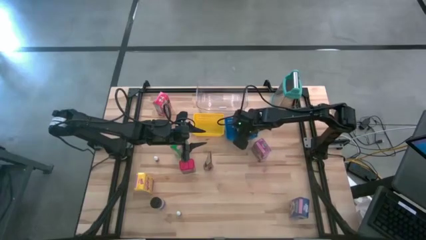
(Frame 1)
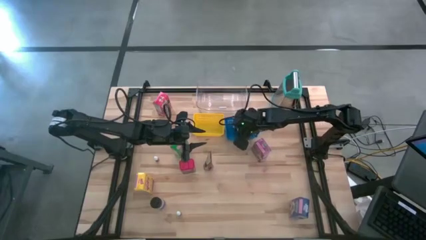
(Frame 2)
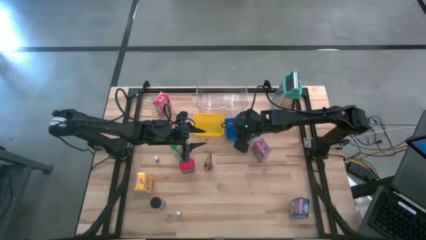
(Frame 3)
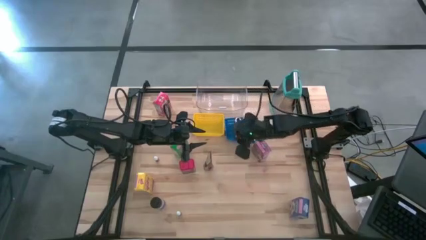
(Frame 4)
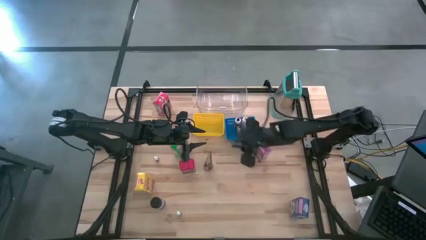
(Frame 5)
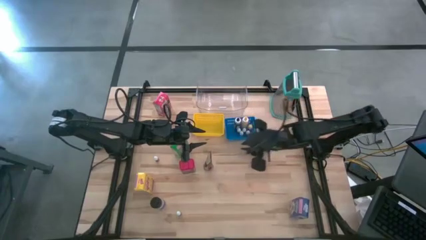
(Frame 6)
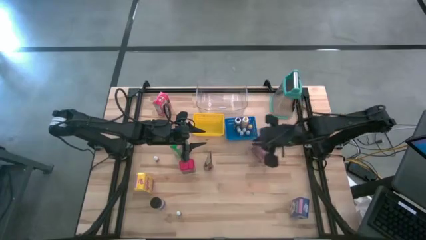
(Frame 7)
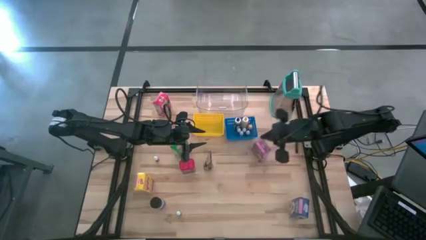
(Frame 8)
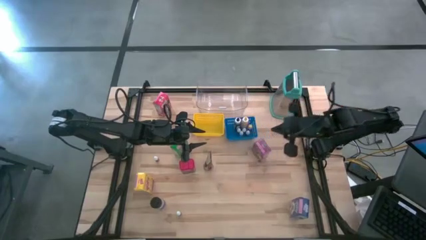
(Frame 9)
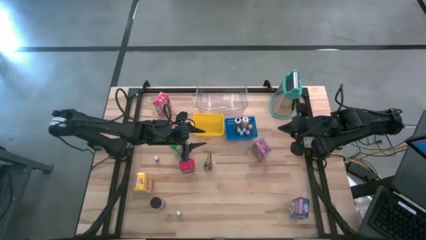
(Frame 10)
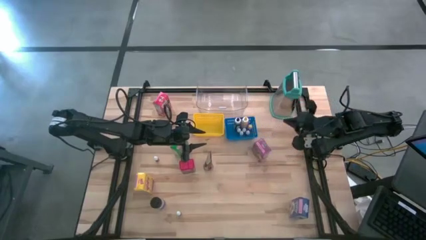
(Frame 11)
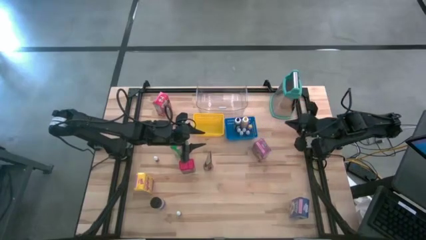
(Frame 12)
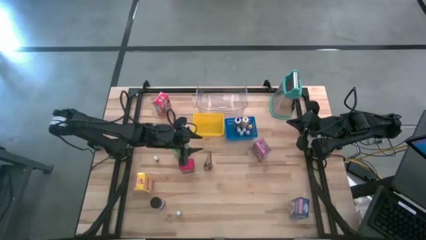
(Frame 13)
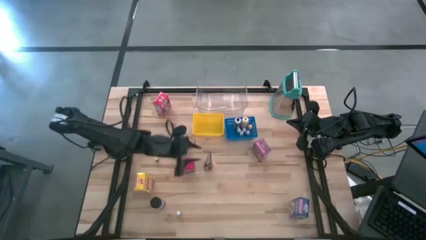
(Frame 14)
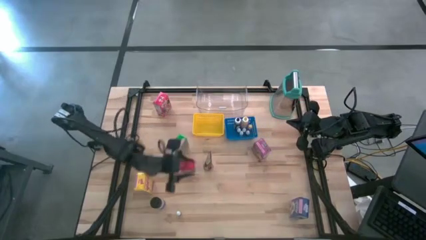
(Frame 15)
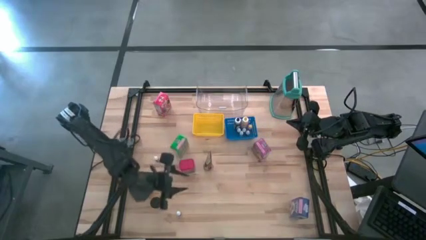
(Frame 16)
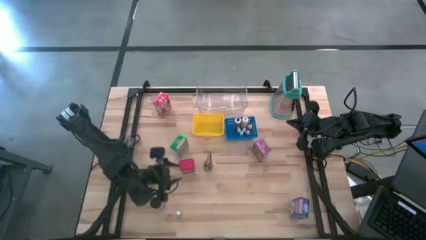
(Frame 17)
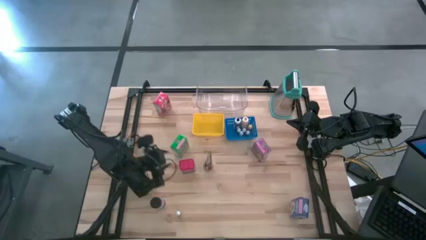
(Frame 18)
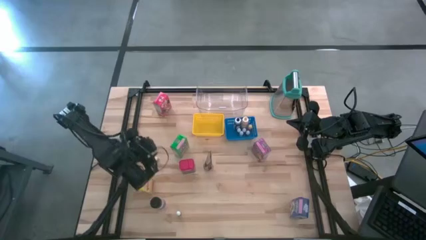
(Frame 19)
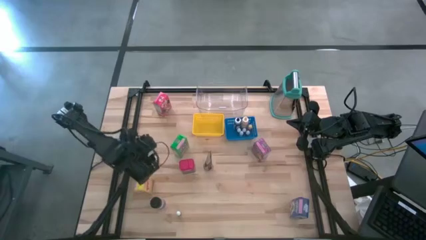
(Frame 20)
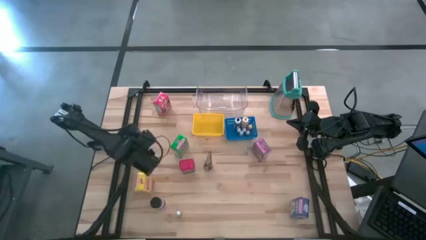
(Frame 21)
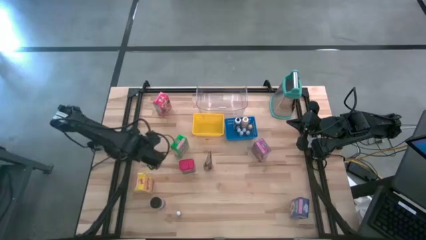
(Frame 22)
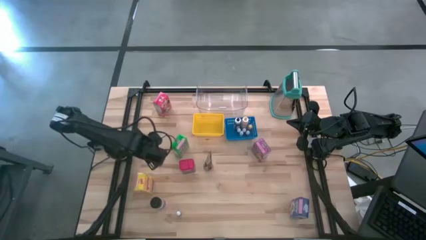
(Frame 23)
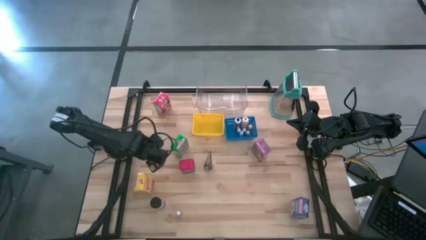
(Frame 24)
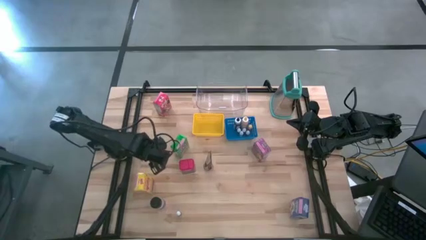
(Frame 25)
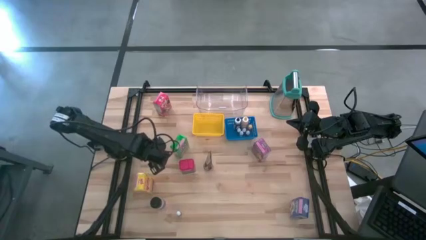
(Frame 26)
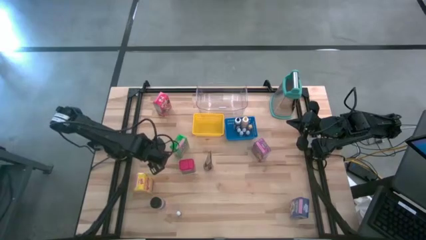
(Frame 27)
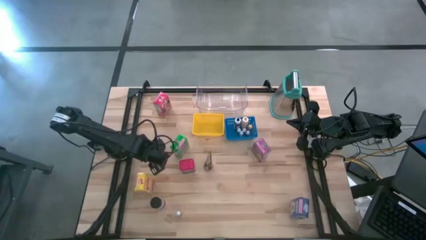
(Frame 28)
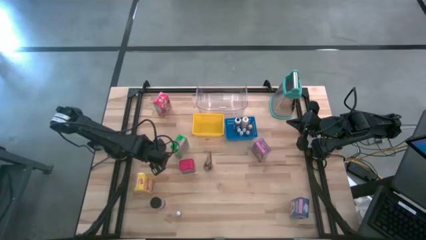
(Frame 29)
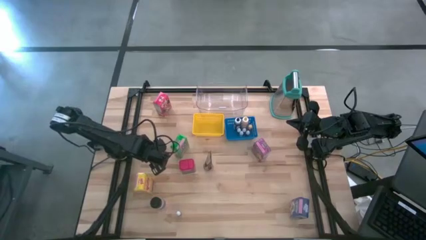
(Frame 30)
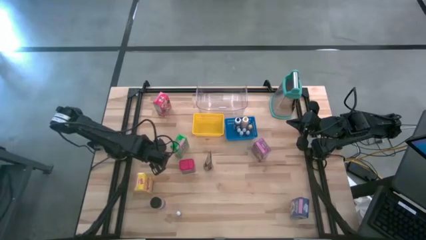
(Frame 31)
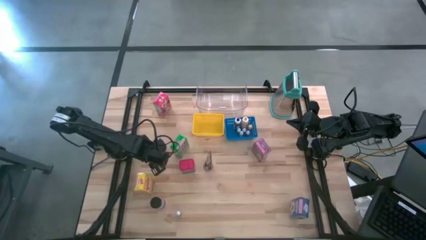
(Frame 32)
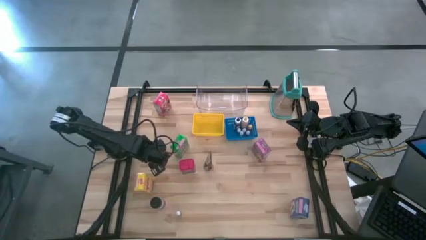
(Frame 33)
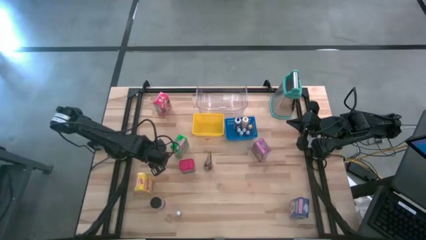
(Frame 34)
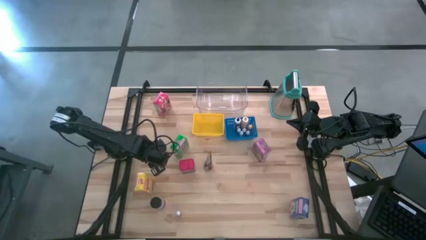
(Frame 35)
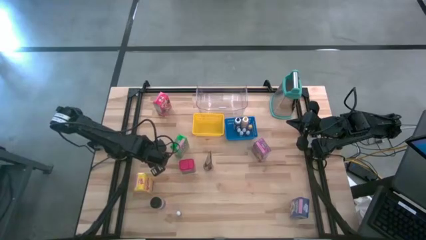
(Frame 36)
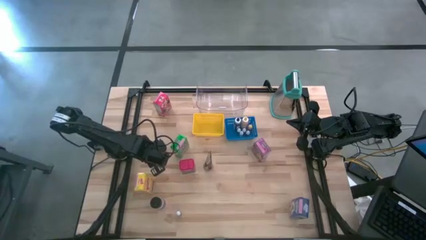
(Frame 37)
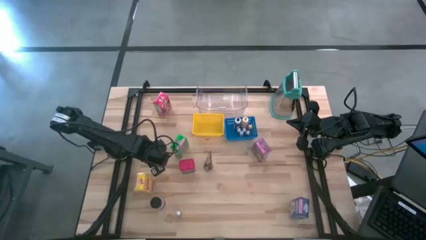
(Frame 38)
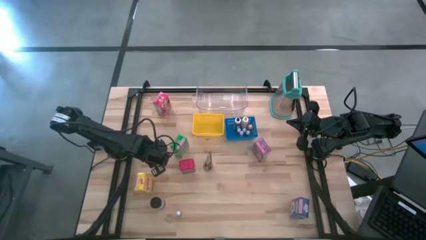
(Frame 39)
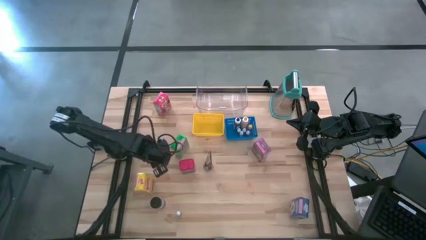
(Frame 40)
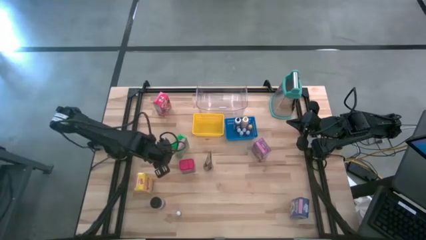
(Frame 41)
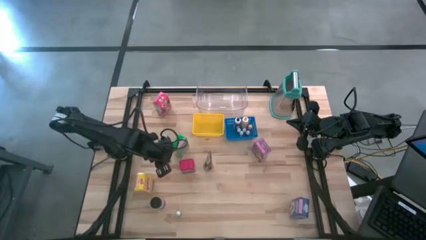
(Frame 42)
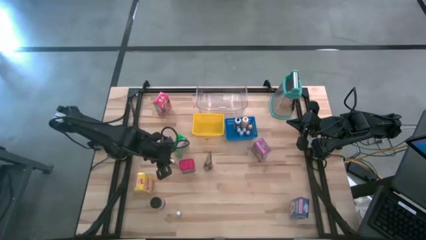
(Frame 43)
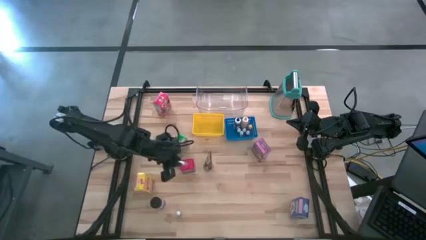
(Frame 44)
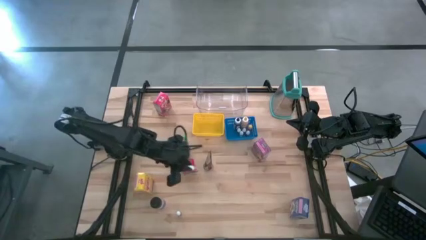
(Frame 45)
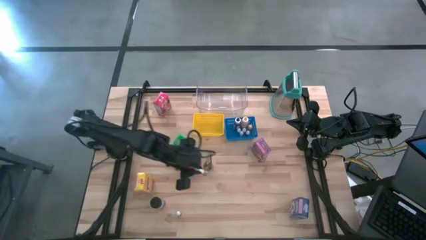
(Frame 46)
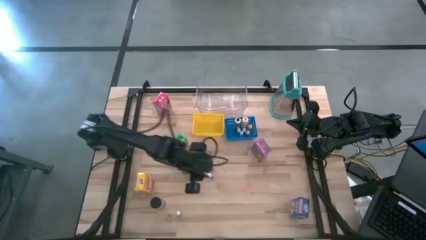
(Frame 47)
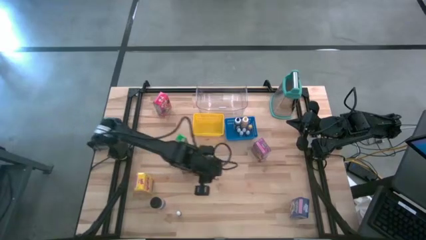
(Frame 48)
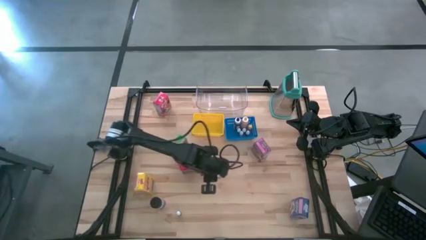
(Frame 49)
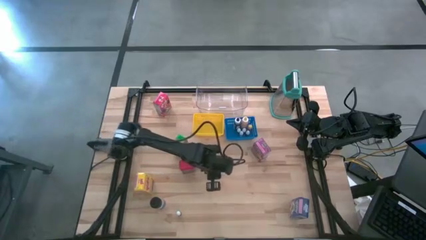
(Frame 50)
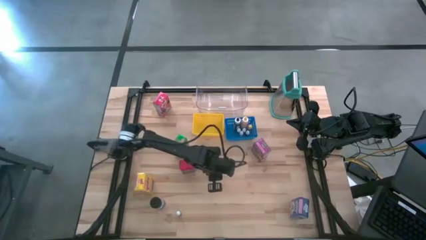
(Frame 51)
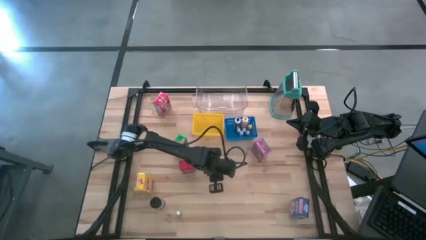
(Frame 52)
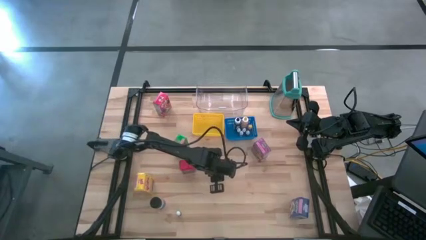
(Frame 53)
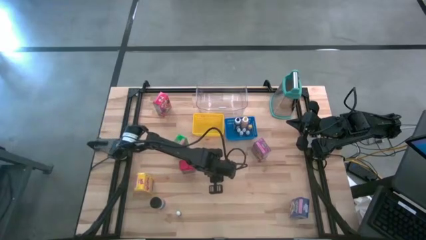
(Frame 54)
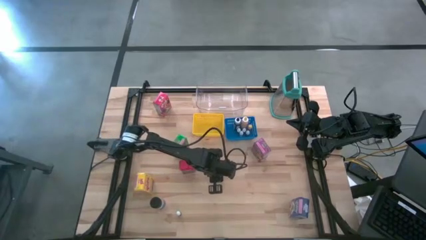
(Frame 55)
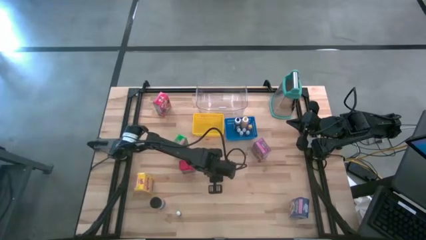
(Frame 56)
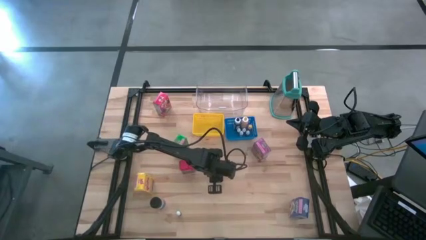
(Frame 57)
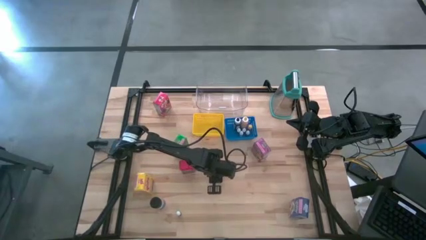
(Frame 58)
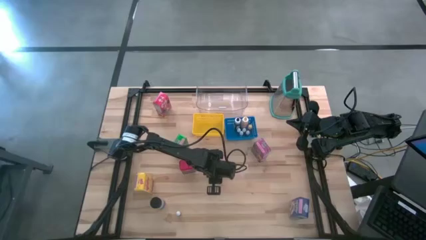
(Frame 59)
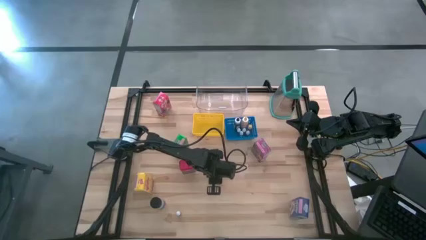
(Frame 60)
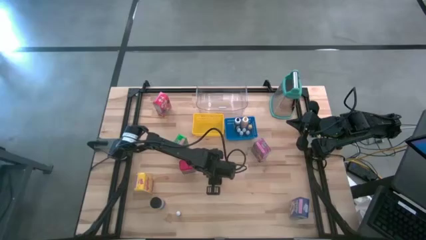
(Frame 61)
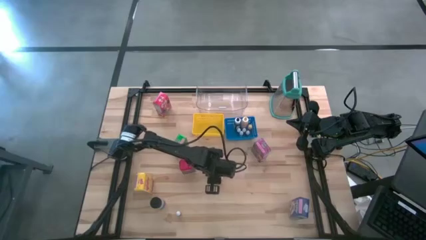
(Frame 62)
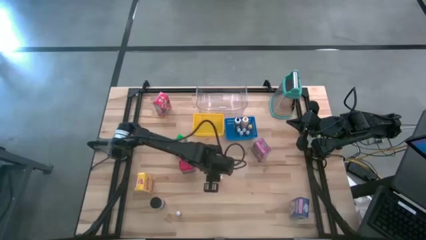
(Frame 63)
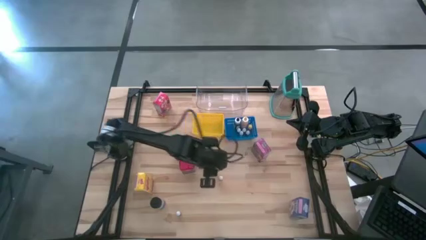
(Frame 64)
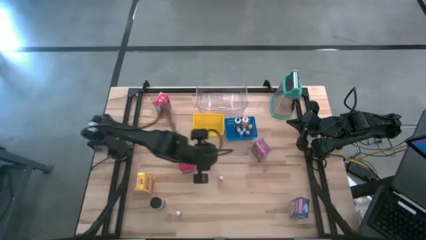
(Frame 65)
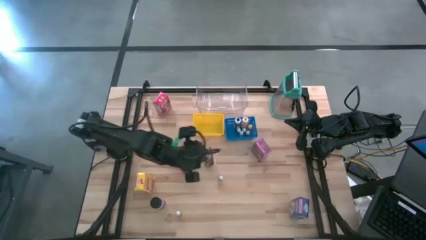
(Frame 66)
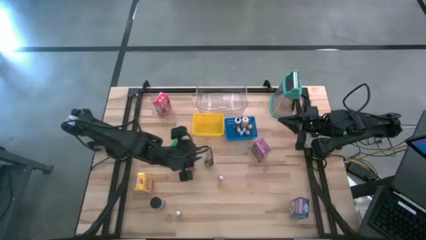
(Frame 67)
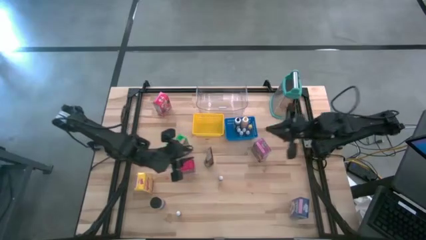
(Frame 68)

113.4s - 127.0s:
Task: Pick & Place Kitchen Items
Put the orange food coloring bottle into the blue bin
